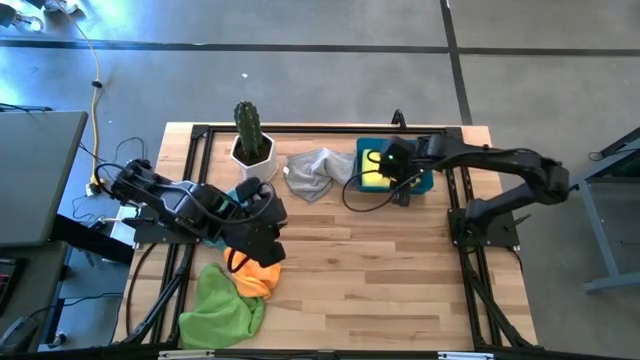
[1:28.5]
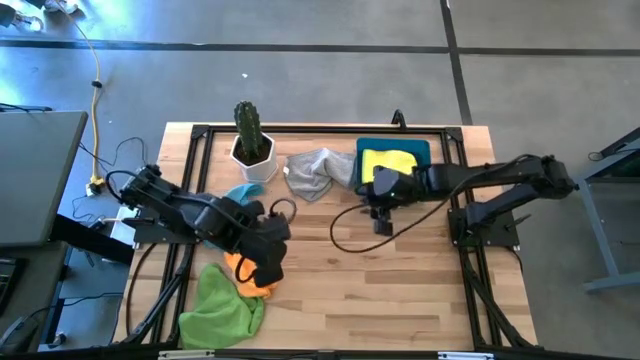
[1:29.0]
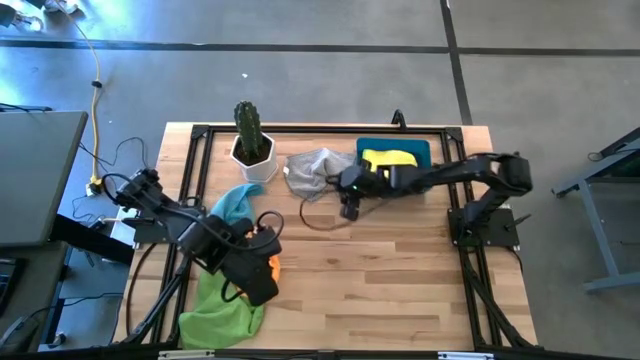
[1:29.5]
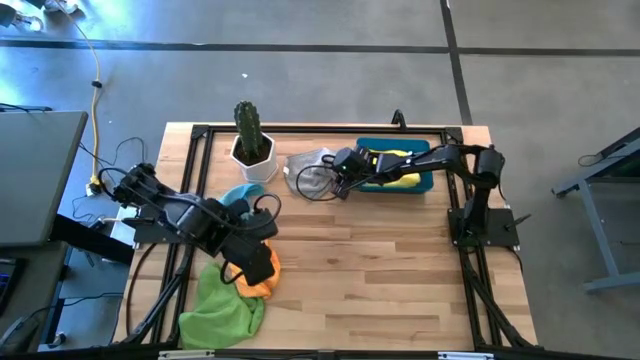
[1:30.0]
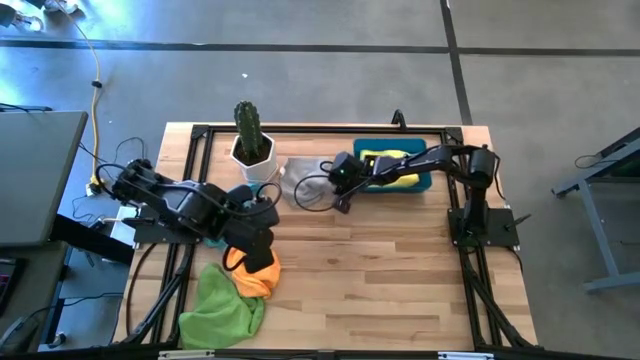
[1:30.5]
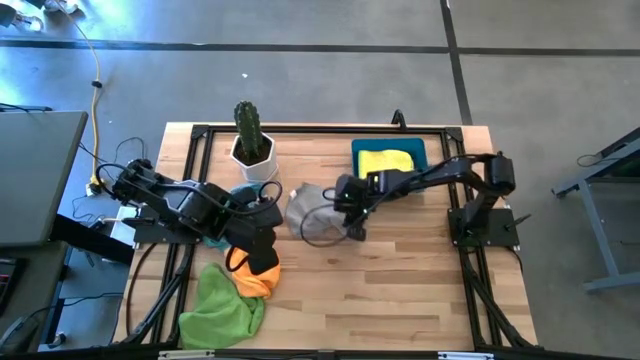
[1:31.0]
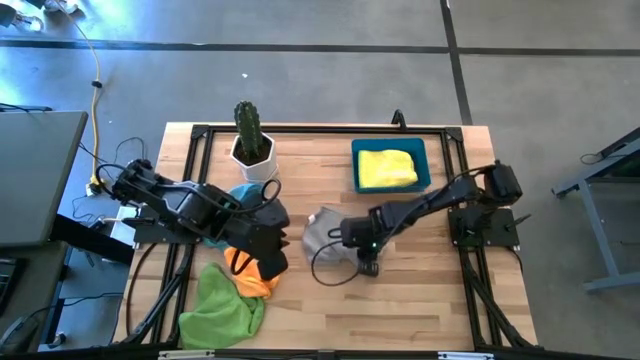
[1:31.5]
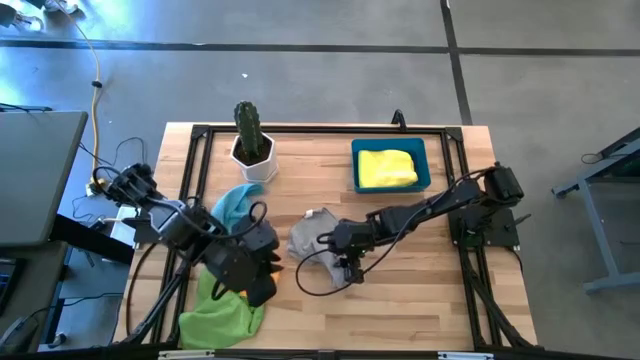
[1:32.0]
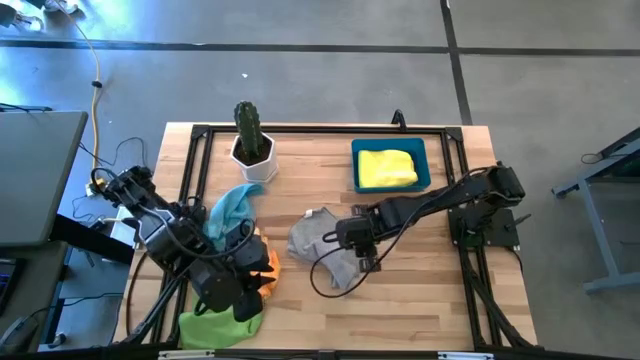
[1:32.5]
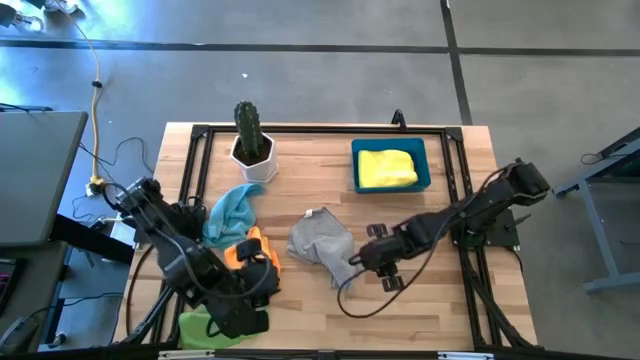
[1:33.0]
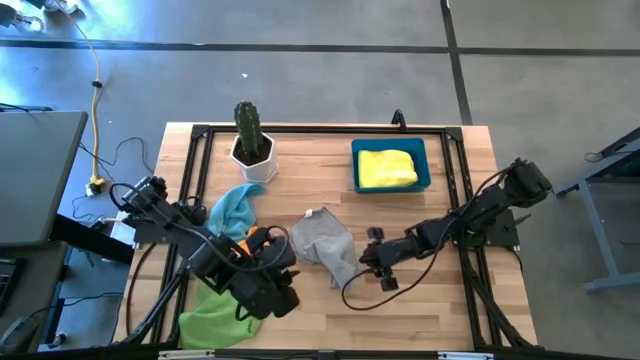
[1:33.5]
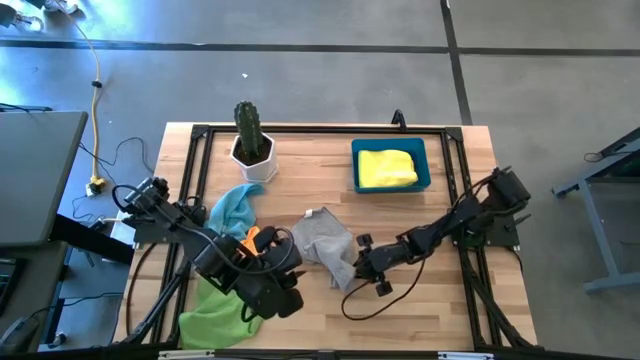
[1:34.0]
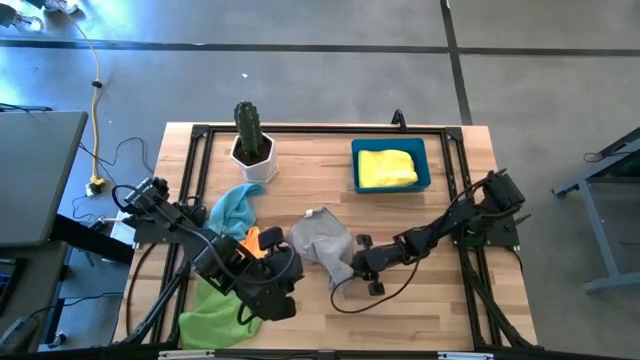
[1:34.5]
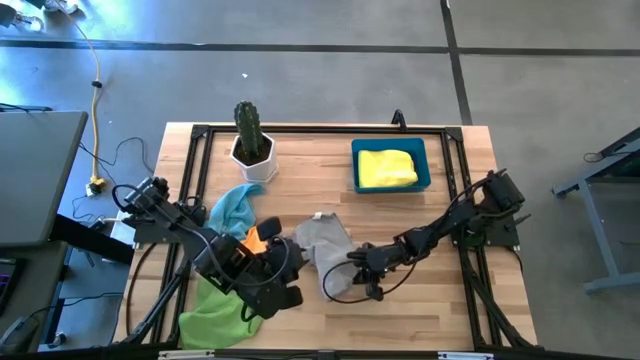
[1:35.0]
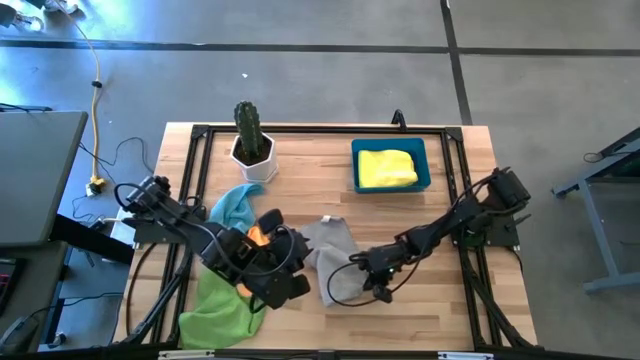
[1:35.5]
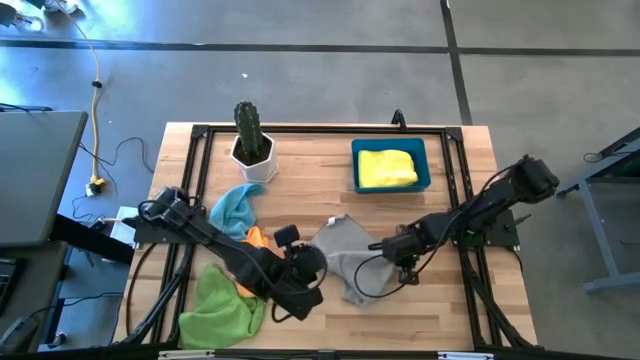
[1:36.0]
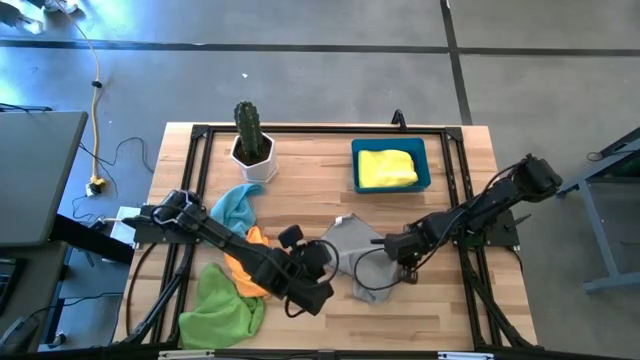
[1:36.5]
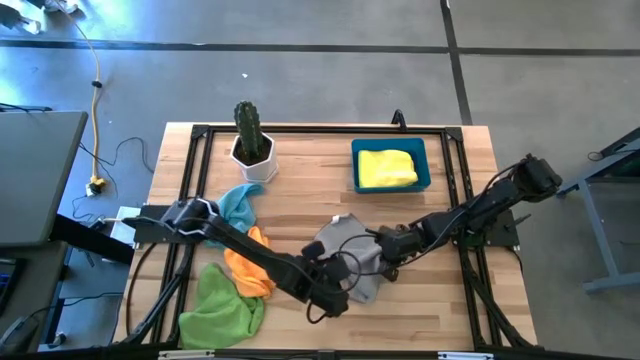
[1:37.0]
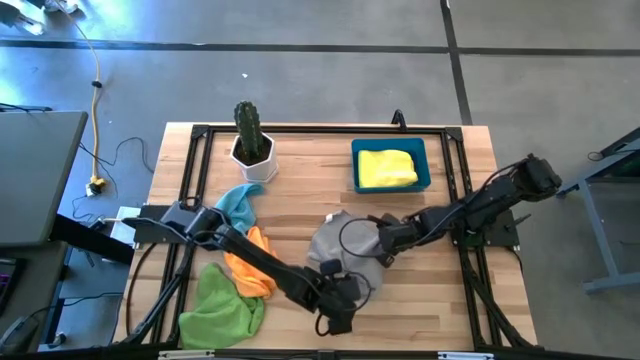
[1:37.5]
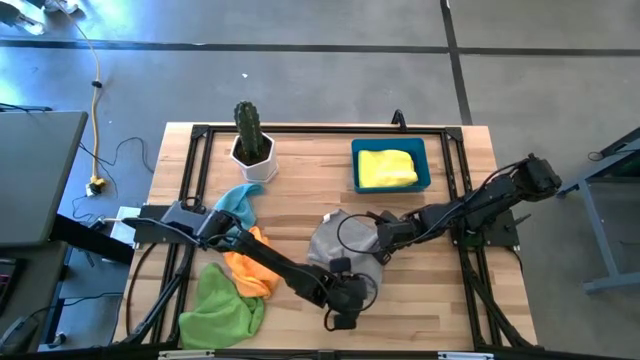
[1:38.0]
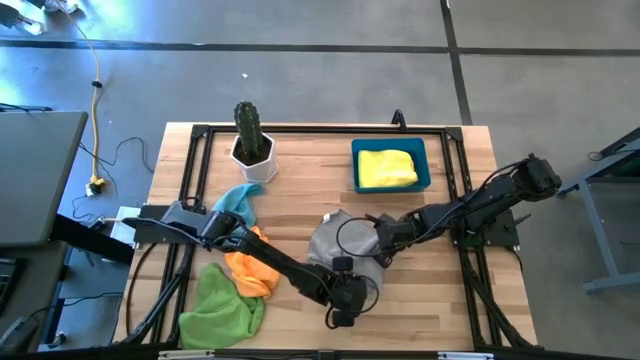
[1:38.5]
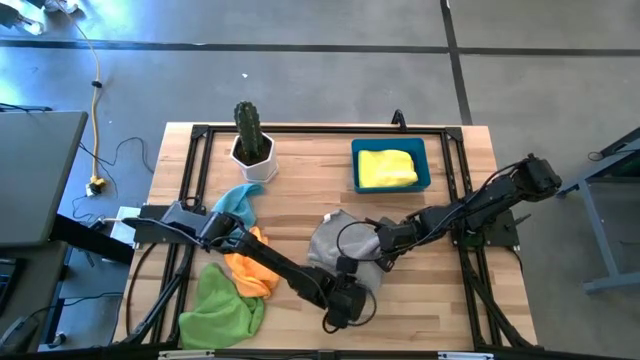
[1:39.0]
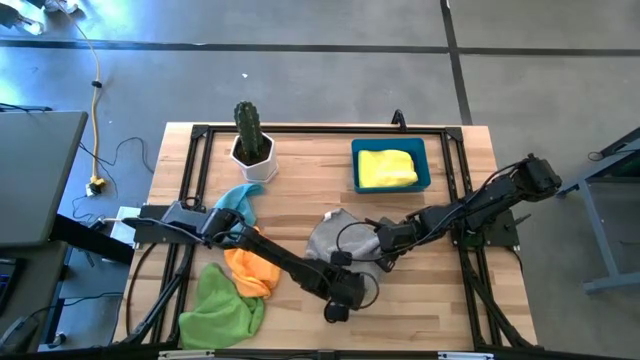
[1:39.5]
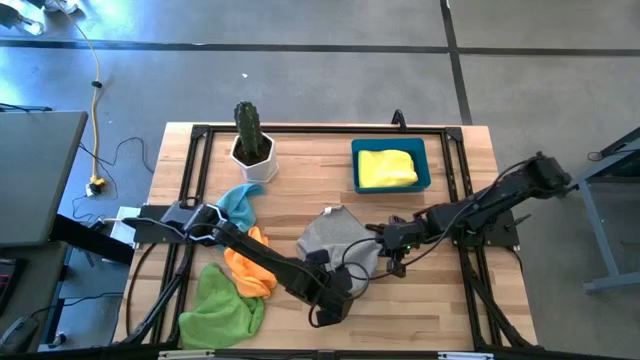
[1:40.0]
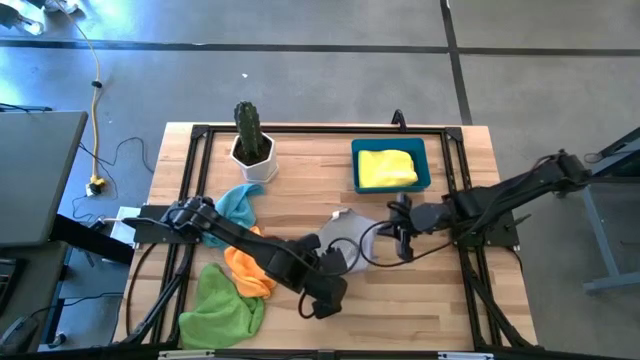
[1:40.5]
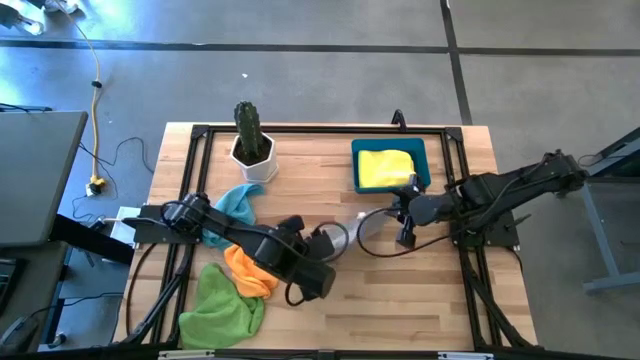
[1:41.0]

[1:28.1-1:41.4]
Task: Fold microfiber towels
Fold the gray microfiber cloth

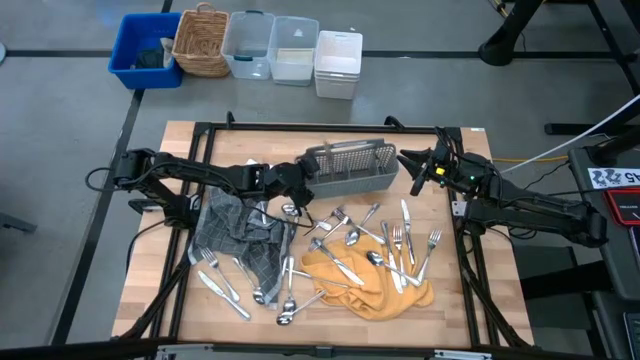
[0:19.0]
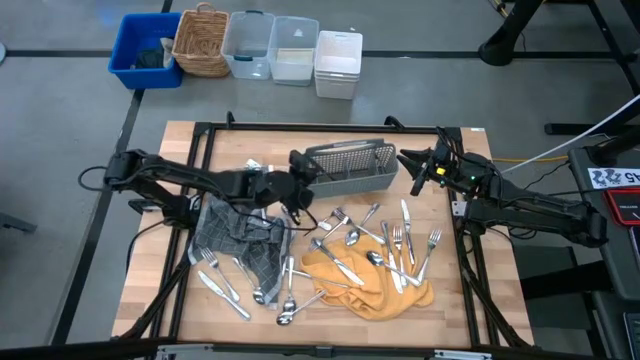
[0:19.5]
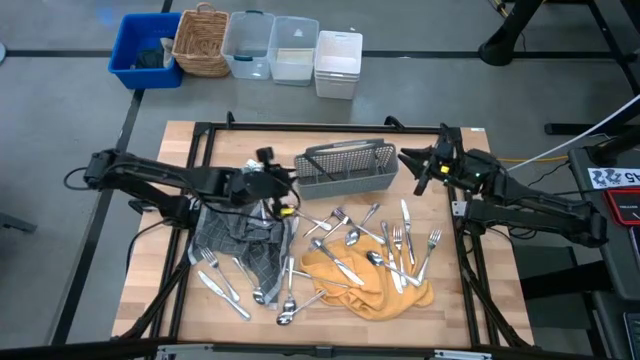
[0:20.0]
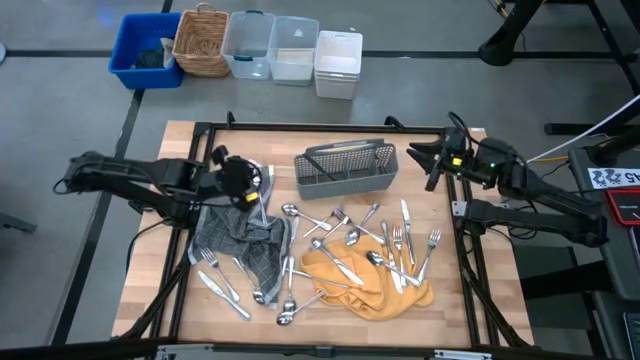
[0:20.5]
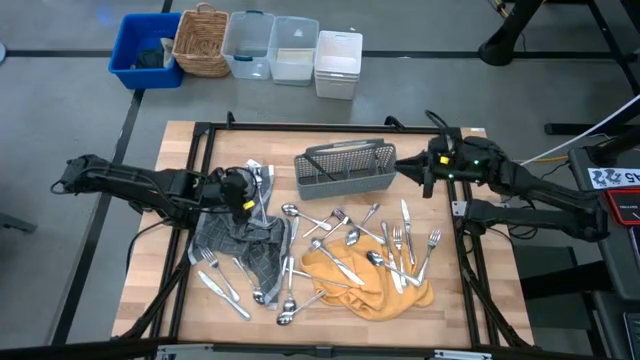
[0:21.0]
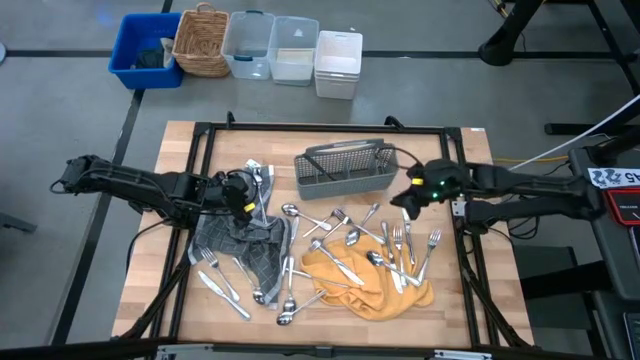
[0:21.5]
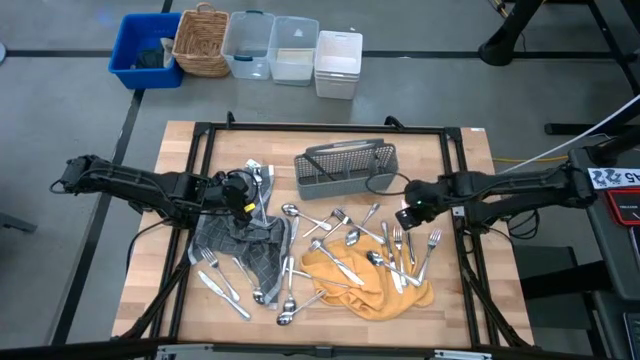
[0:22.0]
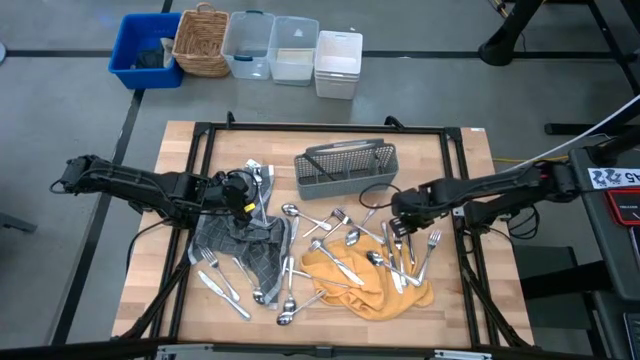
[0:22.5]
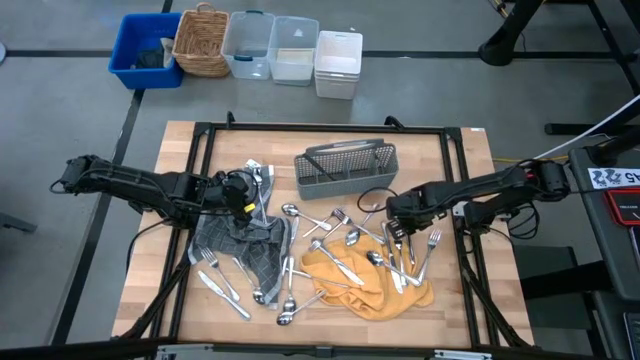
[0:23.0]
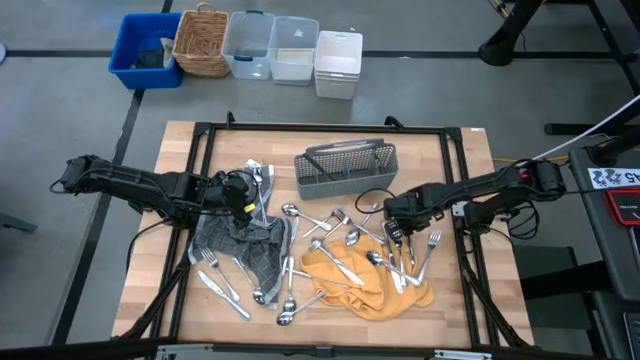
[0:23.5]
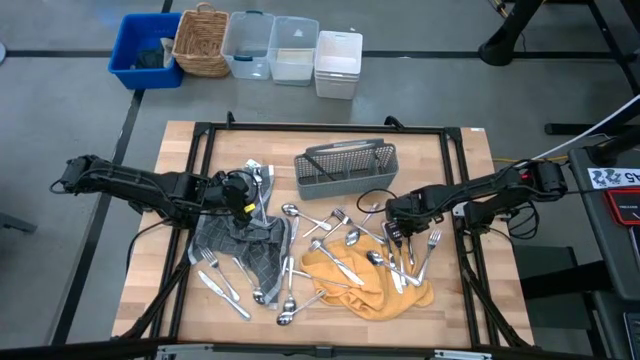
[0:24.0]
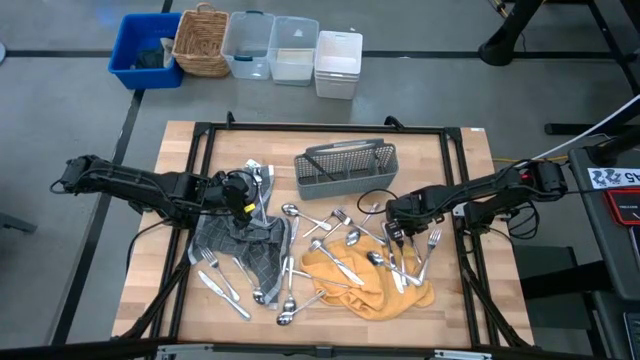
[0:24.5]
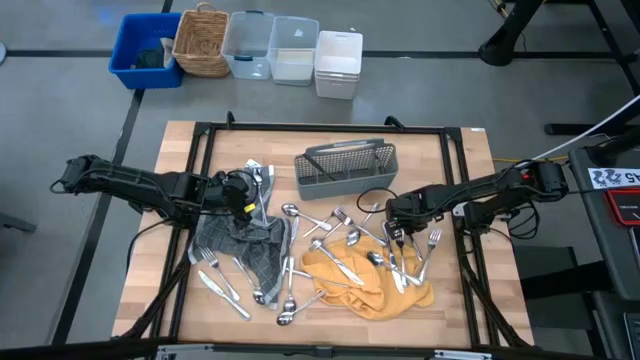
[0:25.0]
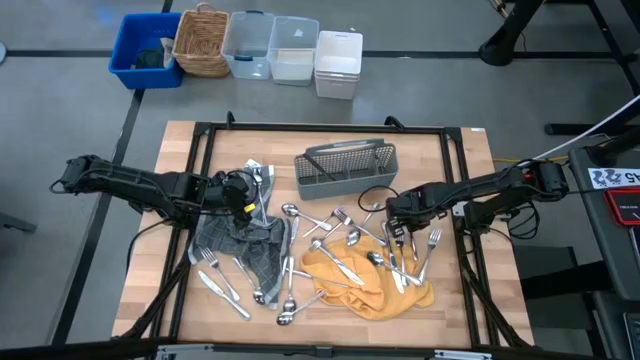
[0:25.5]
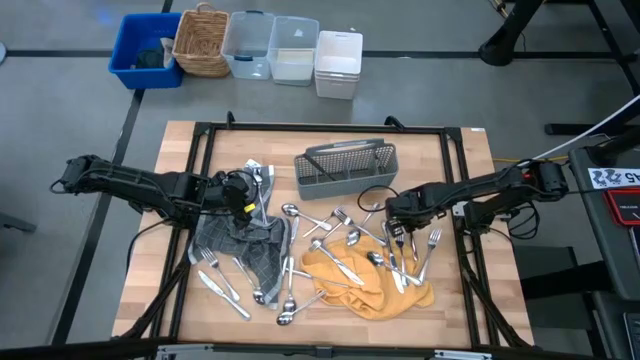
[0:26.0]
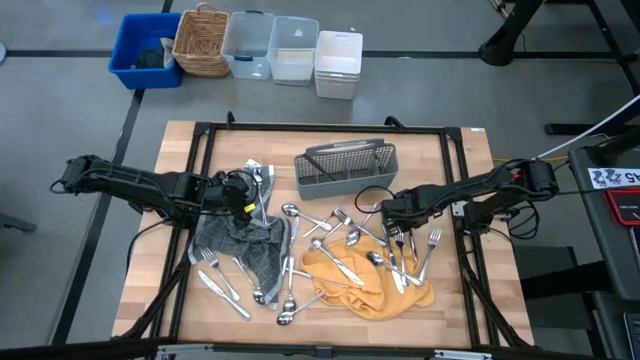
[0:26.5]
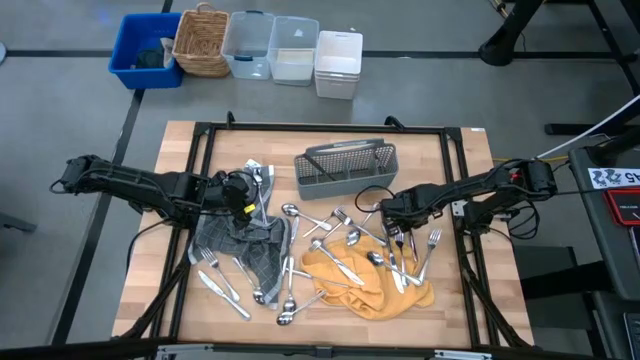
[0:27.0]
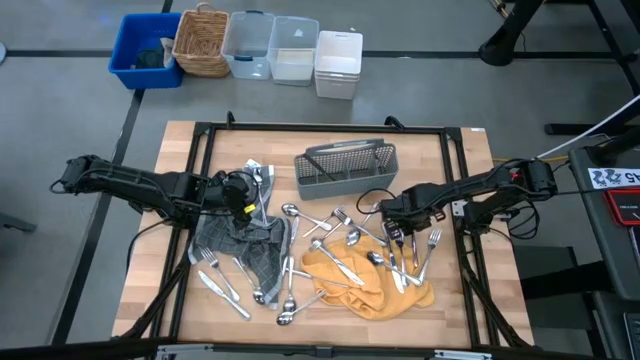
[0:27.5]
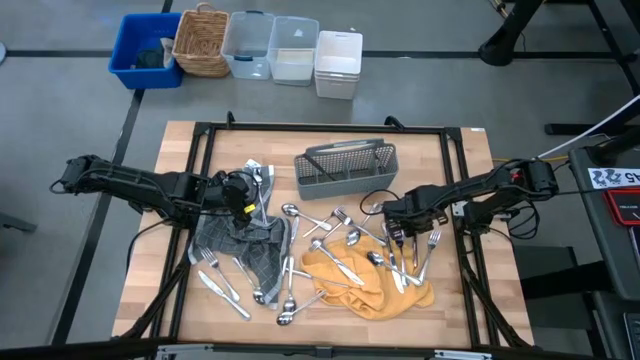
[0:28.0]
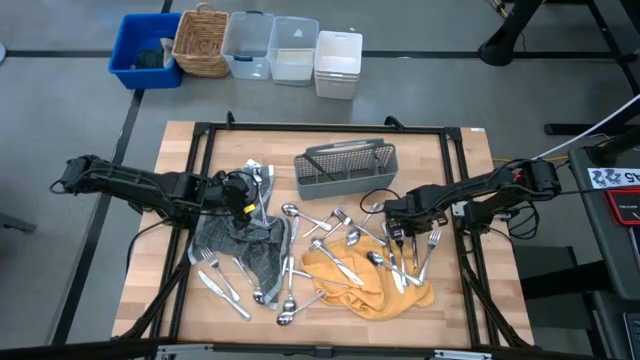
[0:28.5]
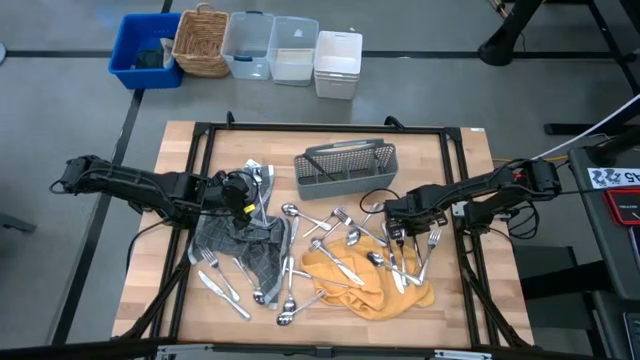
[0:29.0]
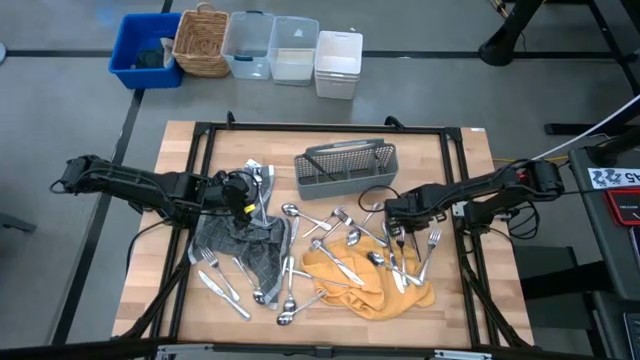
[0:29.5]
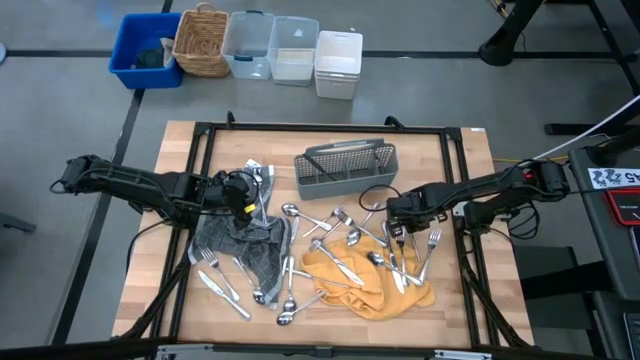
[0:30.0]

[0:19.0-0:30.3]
Task: Sort silverware
Put the silver knife into the gray utensil holder
